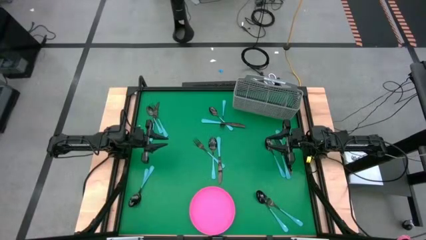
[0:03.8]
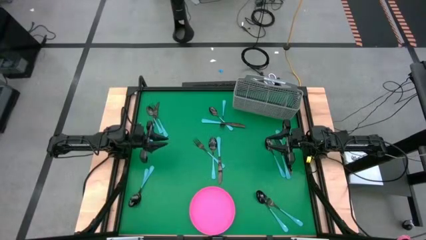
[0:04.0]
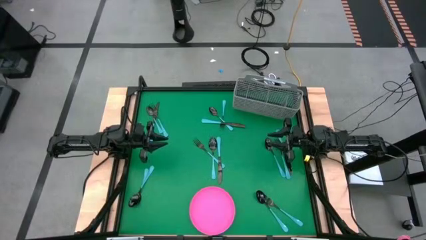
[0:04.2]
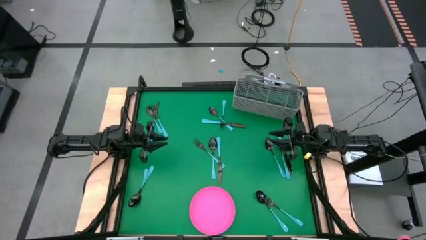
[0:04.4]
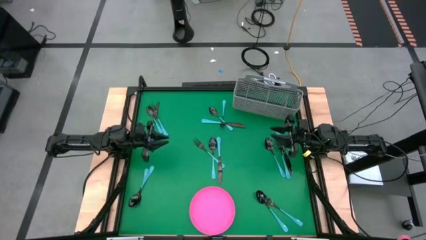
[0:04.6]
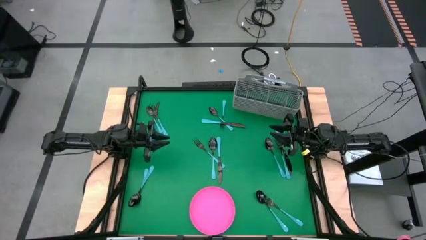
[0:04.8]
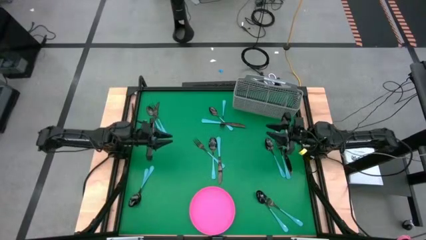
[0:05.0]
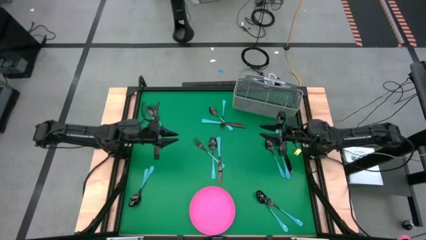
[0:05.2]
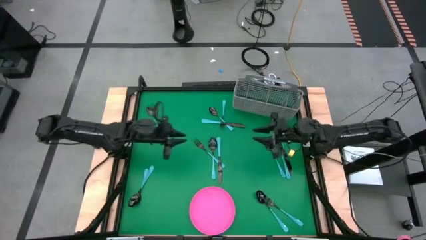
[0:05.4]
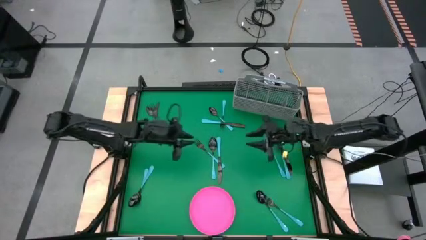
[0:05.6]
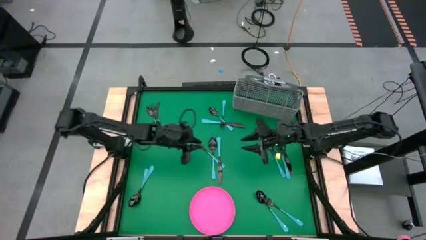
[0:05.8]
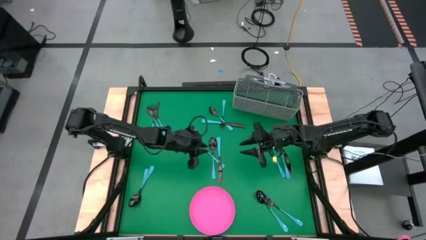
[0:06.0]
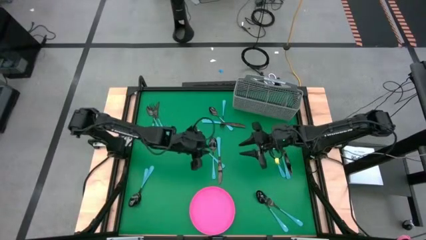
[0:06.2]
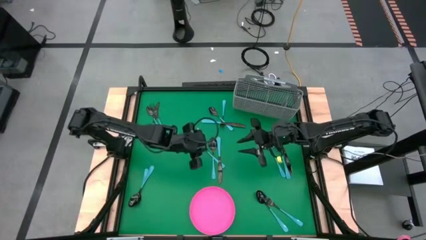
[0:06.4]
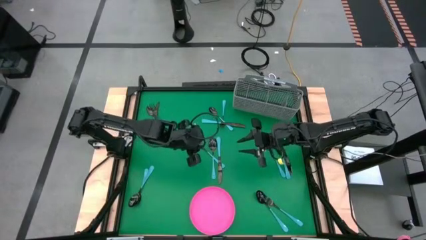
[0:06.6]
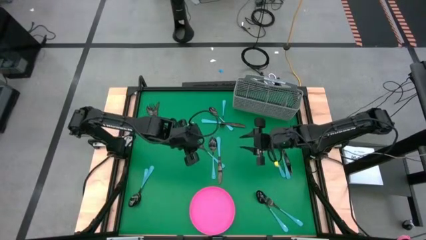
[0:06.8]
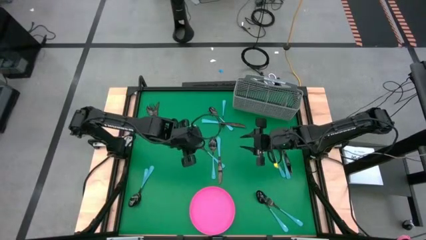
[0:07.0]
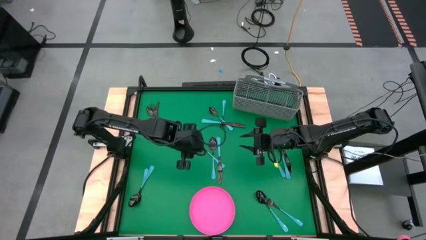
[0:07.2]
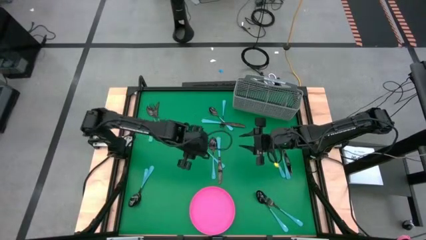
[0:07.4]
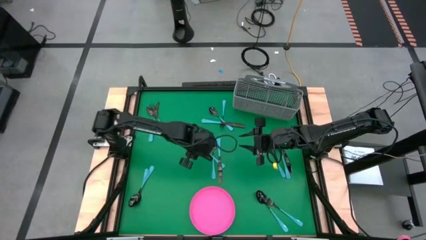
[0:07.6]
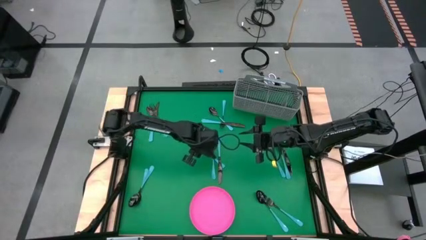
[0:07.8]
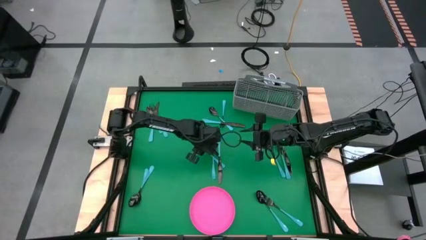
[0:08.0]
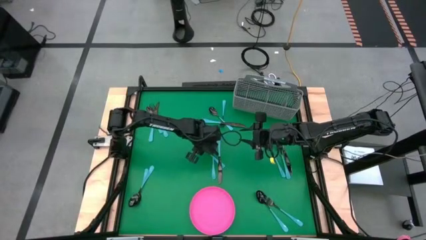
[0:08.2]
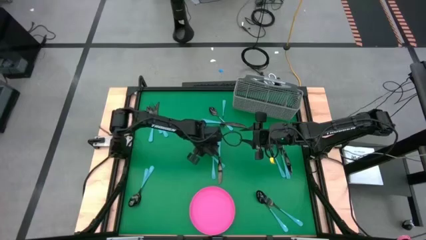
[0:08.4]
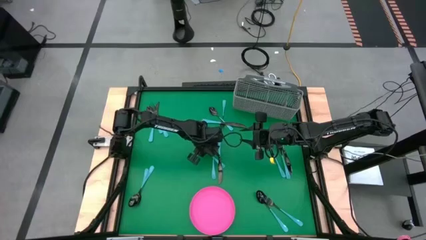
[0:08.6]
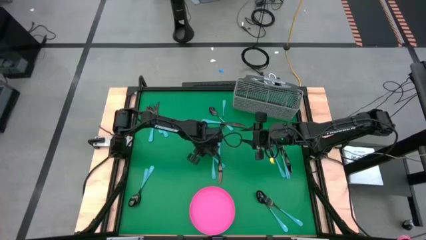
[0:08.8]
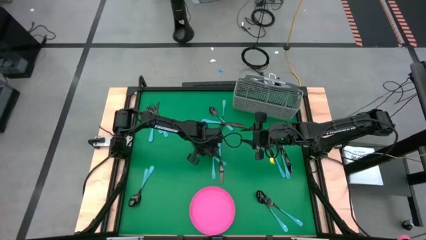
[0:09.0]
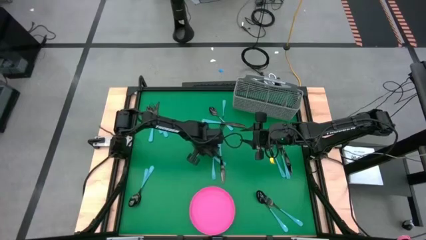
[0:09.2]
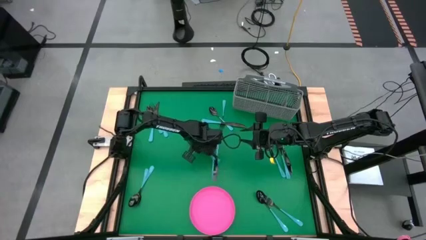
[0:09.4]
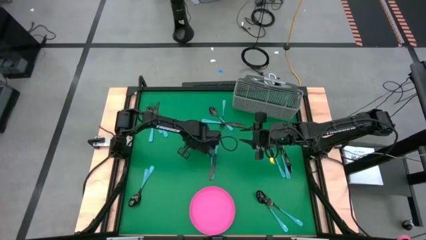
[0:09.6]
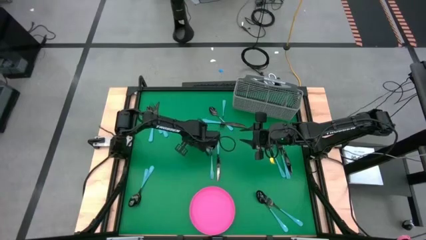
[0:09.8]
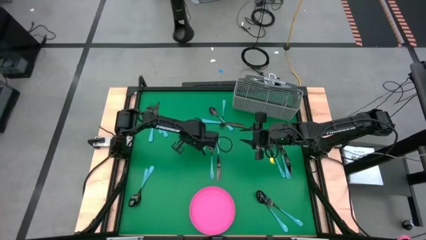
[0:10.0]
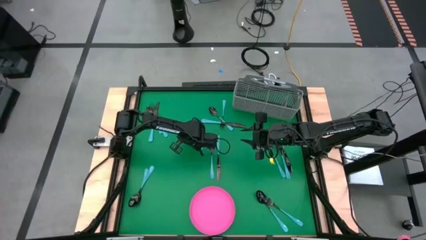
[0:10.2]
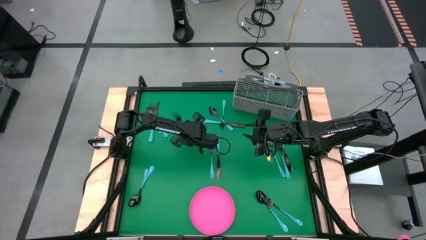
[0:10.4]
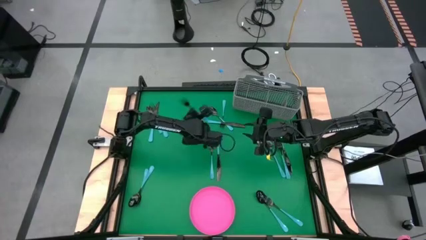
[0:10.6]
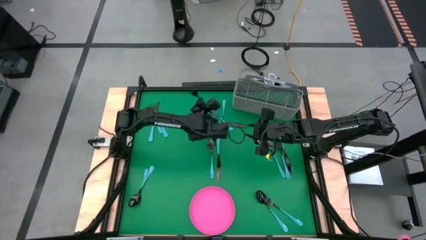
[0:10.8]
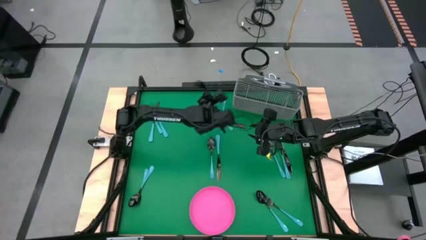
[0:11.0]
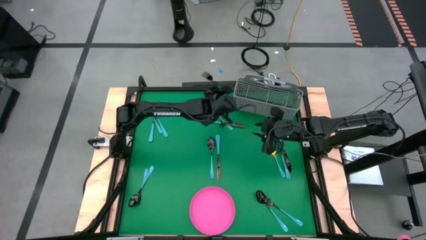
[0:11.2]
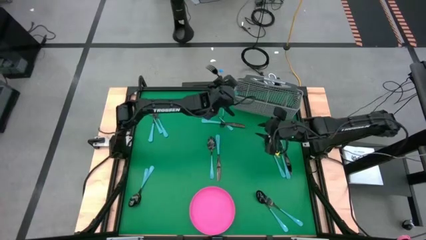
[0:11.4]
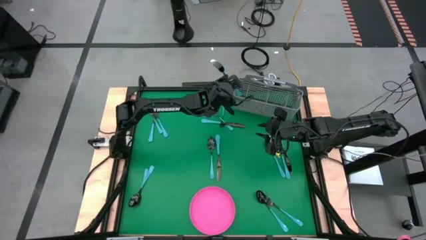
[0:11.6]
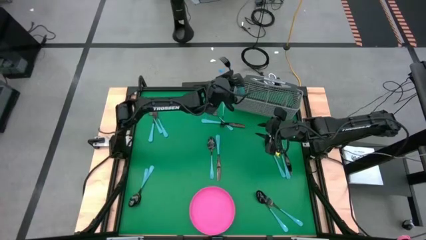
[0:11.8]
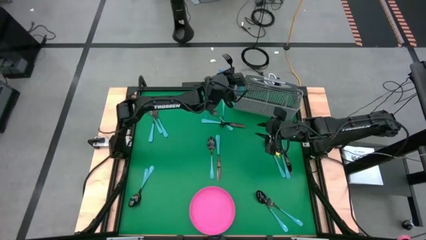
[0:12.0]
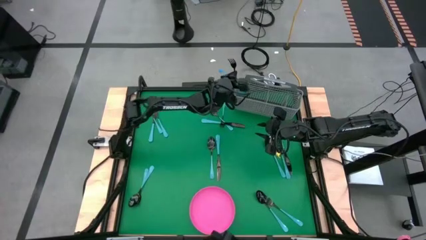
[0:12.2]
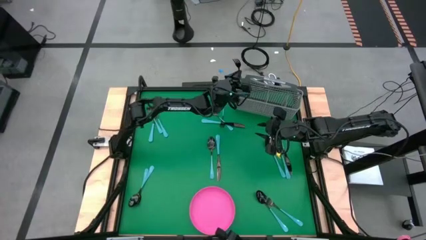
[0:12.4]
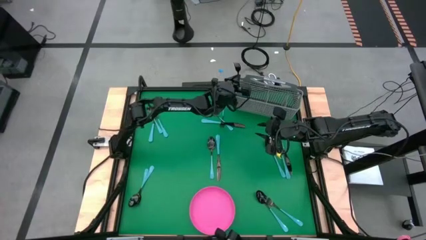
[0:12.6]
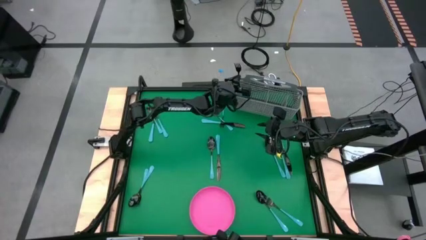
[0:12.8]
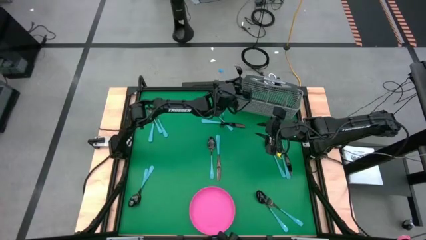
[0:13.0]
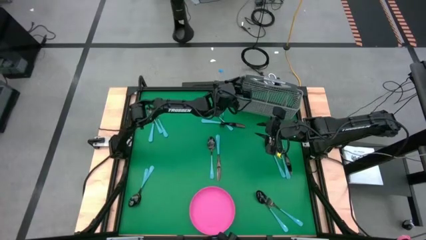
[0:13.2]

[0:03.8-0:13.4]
Task: Sort silverware
Put the blue fork into the utensil holder

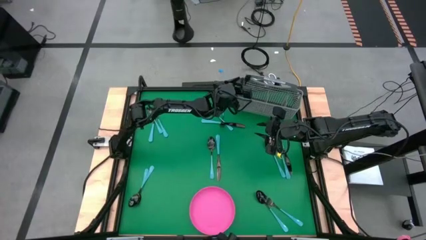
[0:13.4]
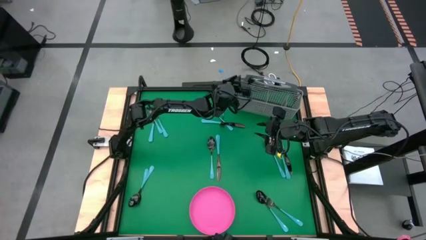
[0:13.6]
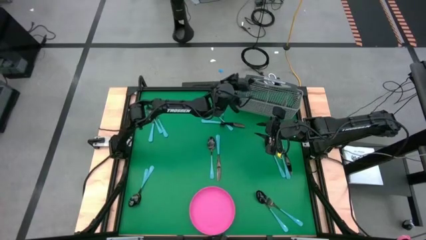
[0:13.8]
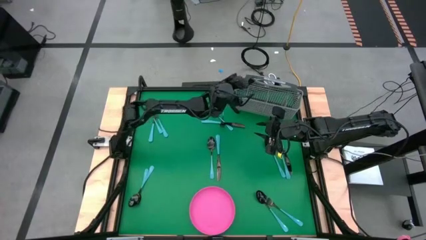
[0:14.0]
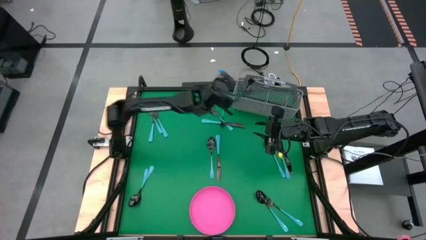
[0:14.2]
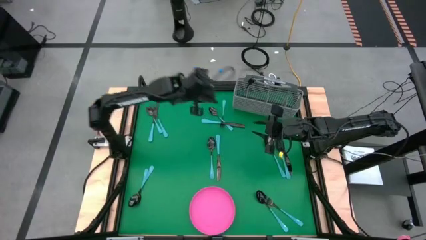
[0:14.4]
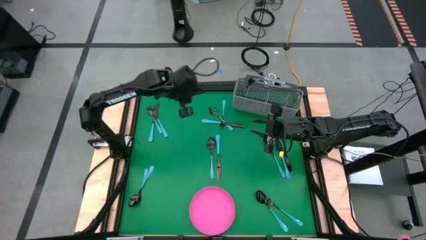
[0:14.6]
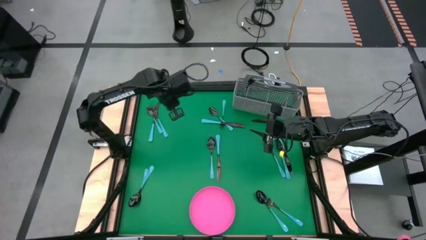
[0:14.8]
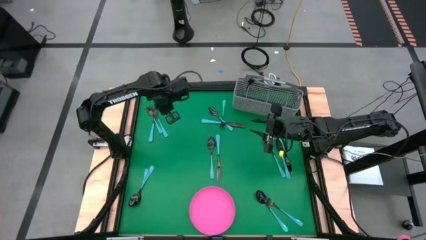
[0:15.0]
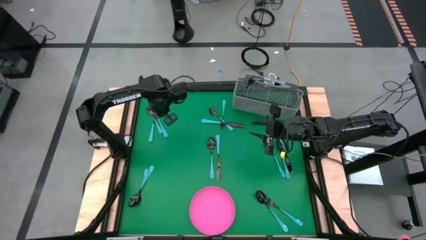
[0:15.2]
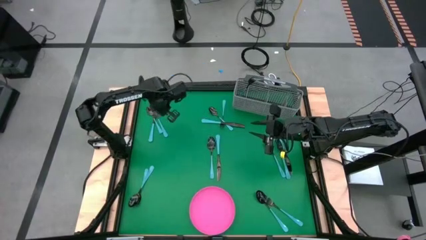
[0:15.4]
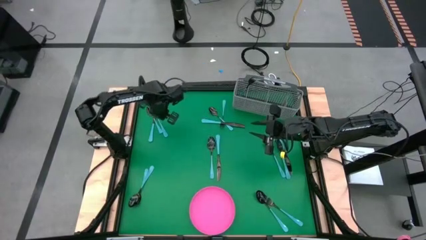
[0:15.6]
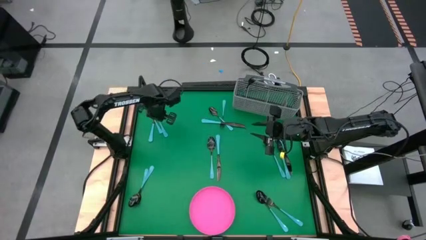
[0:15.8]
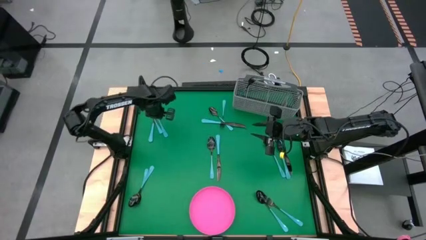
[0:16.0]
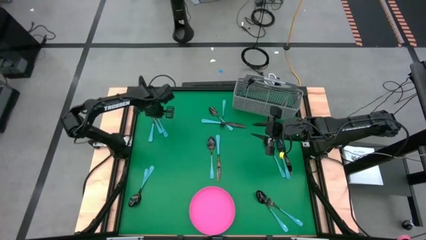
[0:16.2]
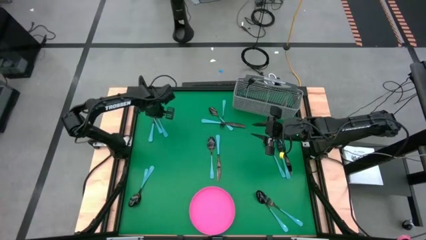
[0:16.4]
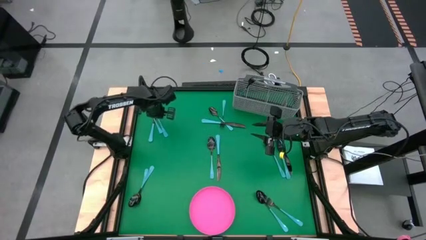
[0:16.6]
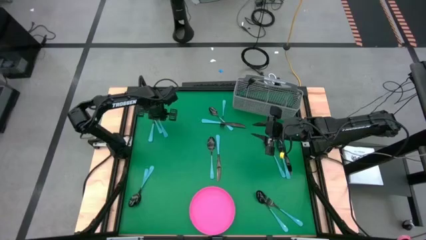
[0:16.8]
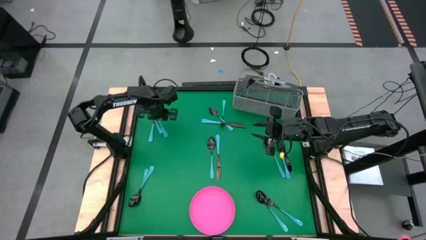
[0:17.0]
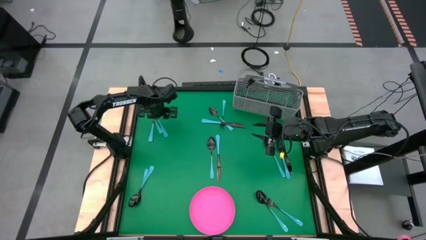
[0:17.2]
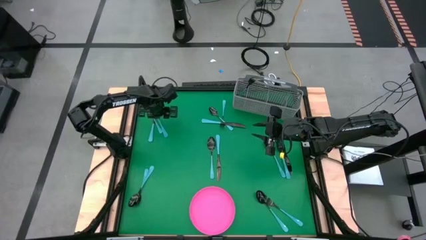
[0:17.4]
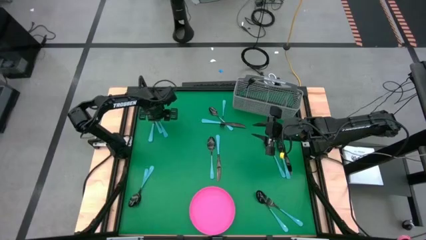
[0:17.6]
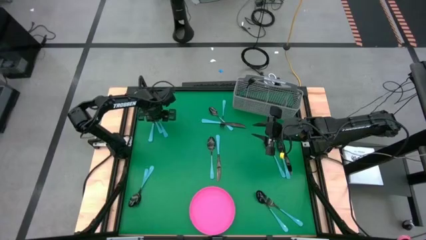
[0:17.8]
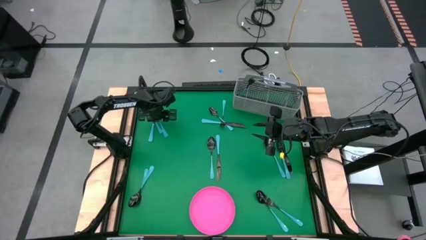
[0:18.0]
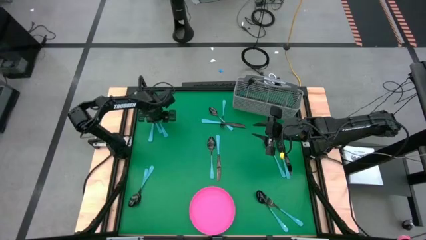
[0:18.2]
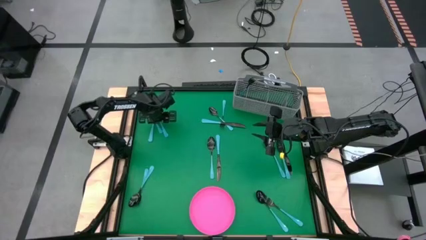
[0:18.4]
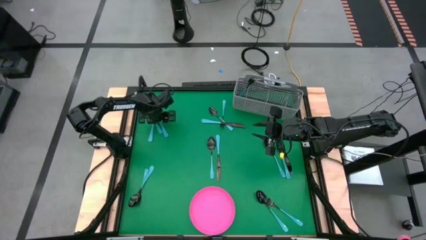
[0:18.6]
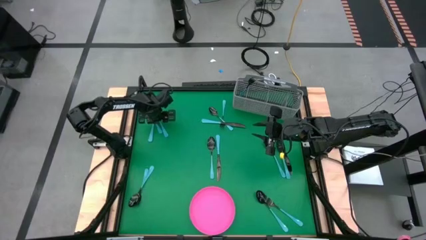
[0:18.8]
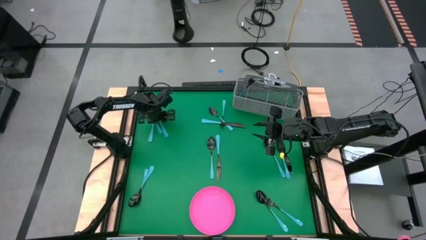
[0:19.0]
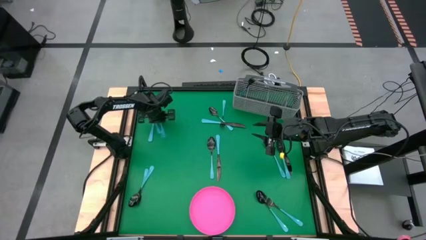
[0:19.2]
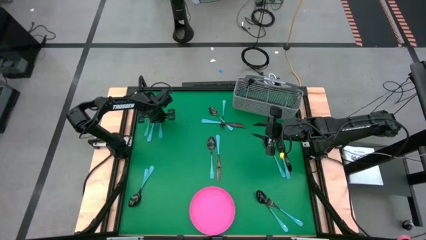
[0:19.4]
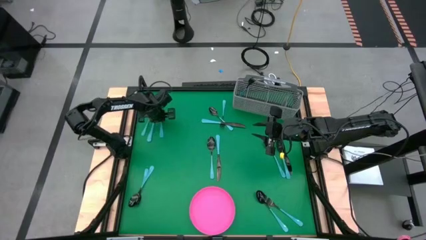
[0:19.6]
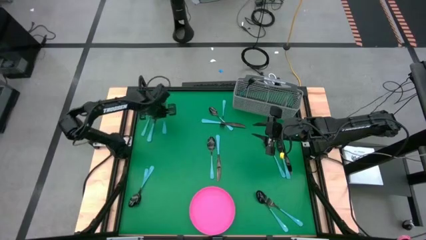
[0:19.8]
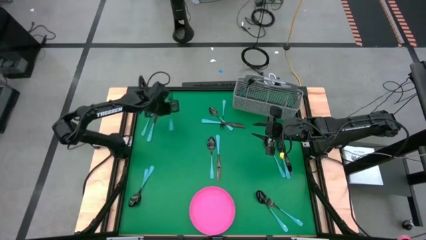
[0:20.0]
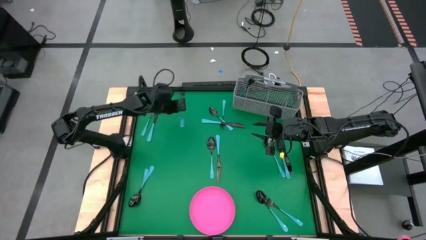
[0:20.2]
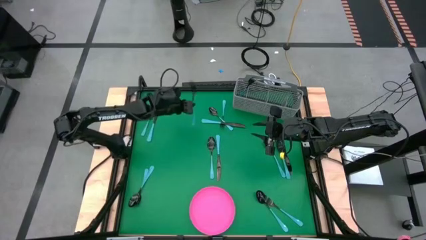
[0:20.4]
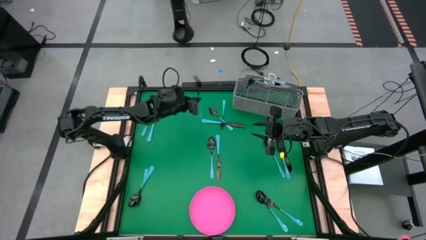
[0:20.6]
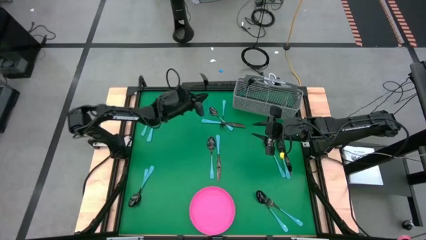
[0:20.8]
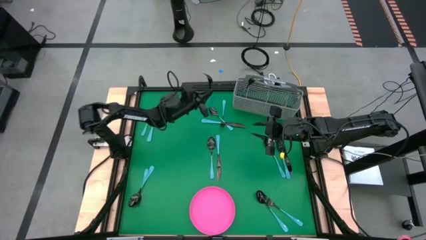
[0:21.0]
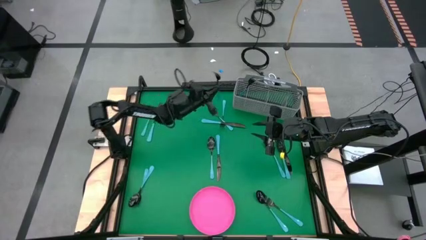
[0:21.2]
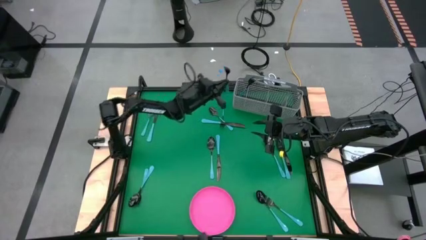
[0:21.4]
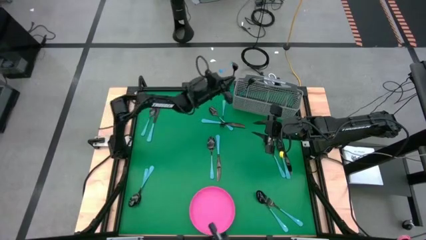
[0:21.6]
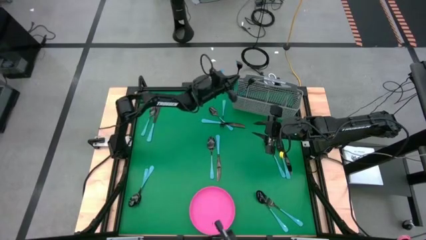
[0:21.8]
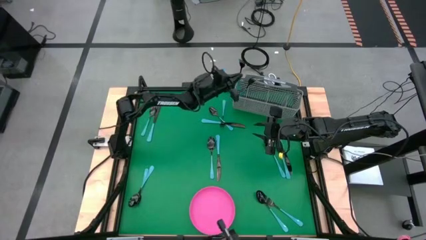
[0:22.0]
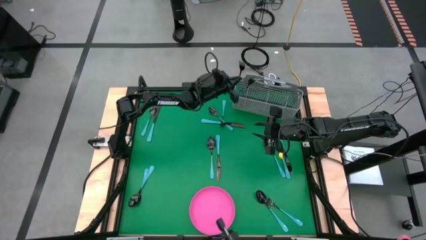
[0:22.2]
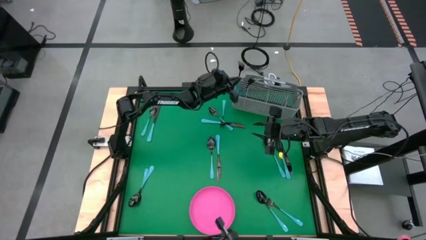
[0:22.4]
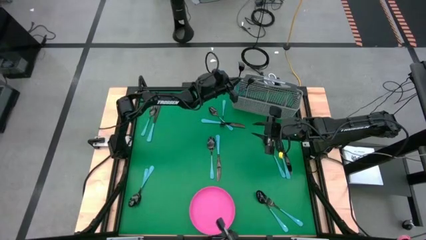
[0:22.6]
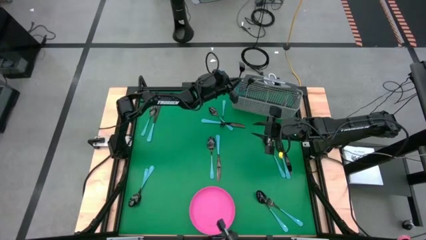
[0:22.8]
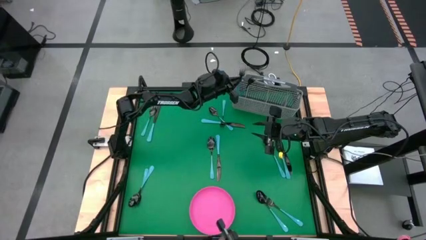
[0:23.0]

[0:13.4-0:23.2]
Put the blue fork into the utensil holder
